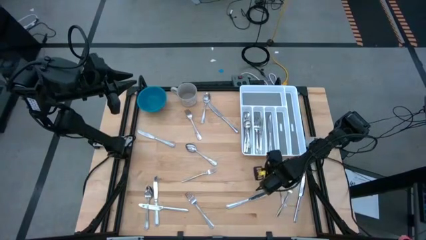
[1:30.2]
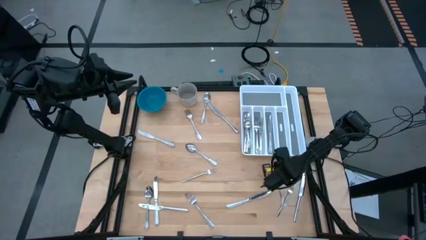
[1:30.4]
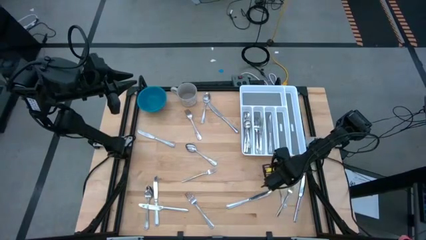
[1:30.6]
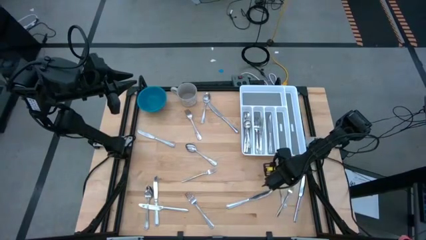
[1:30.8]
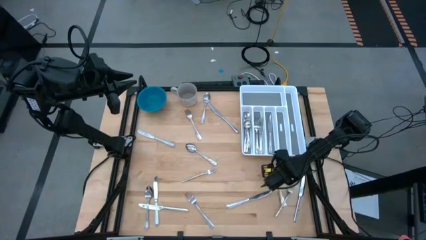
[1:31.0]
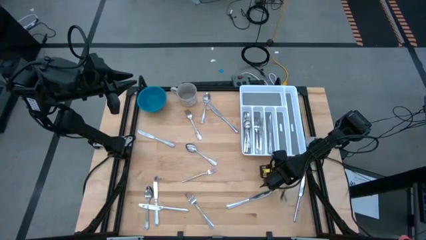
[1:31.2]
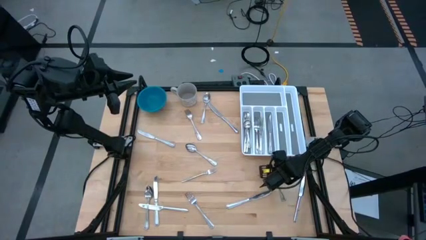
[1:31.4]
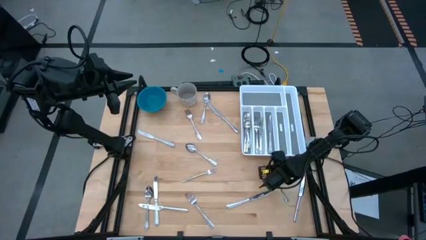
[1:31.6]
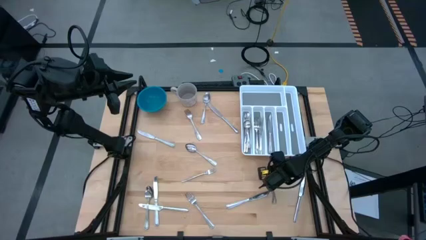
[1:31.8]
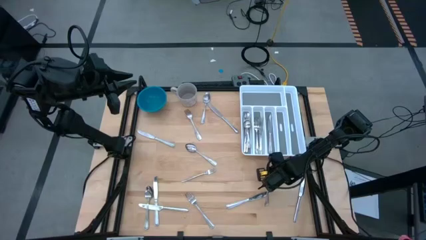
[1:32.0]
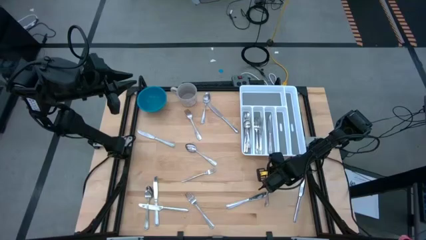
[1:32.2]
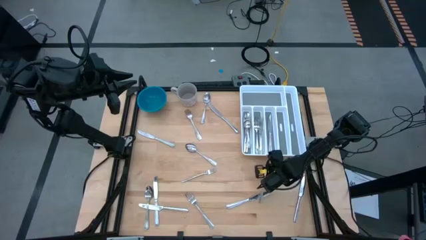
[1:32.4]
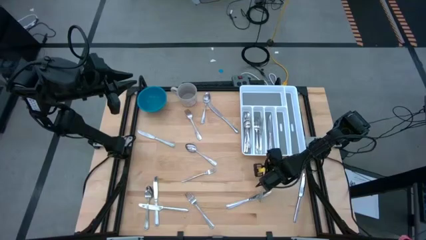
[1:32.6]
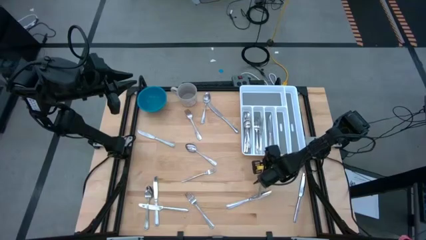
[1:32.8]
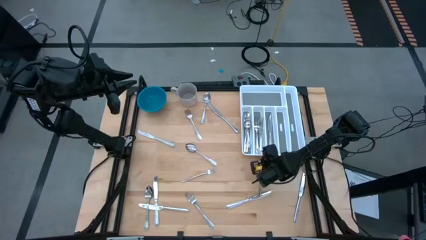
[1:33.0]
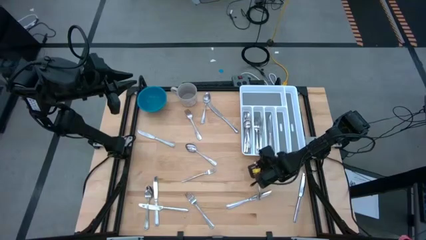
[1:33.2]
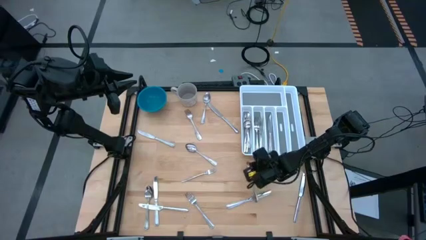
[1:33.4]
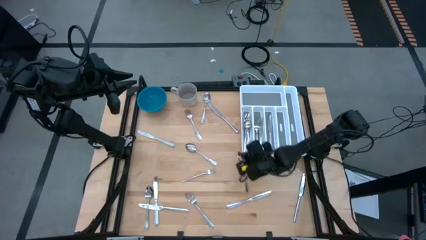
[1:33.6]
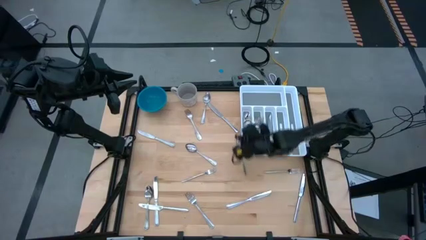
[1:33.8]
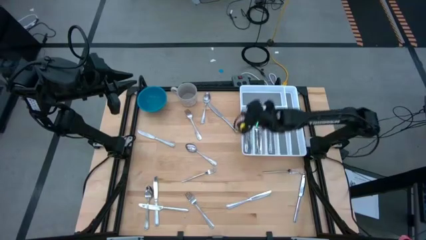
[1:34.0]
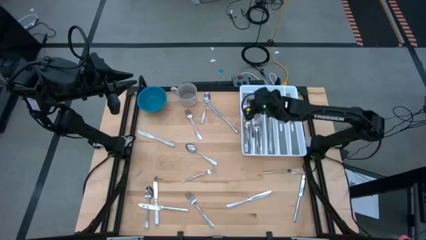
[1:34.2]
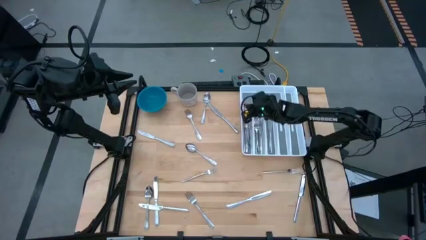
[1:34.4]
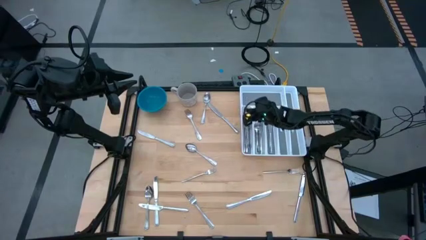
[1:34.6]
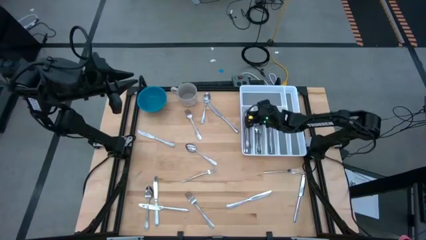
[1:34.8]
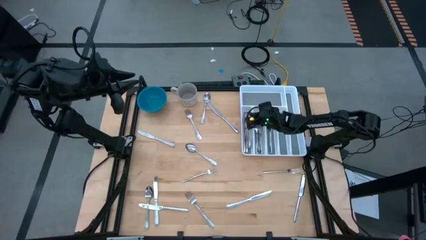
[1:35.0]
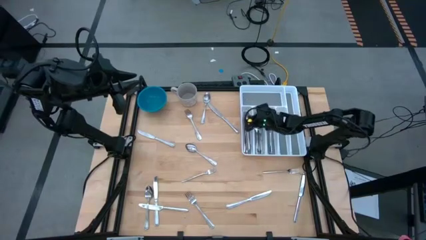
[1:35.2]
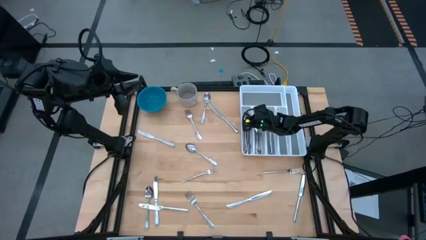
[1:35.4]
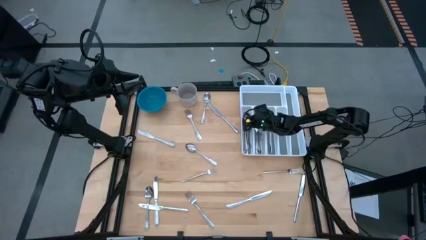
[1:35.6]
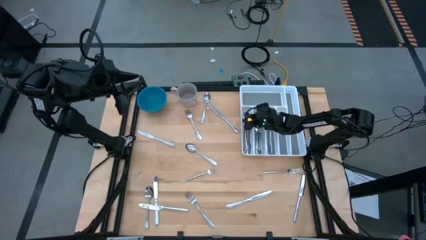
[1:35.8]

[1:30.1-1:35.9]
Task: Sort silverware
Put the spoon in the silverware tray

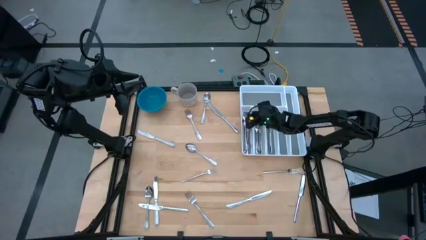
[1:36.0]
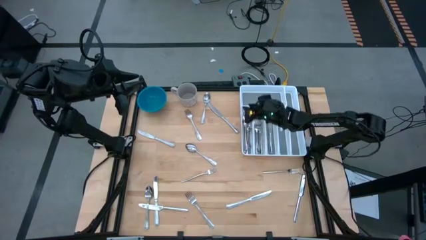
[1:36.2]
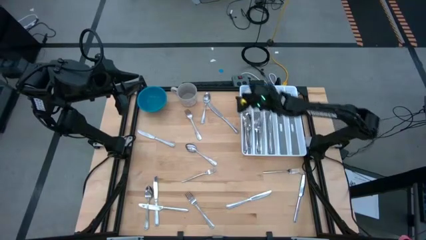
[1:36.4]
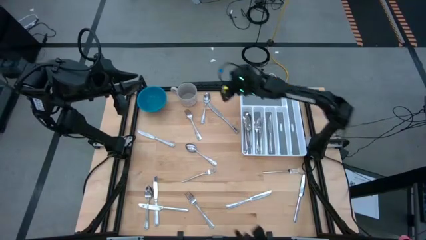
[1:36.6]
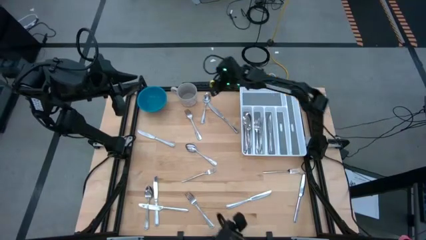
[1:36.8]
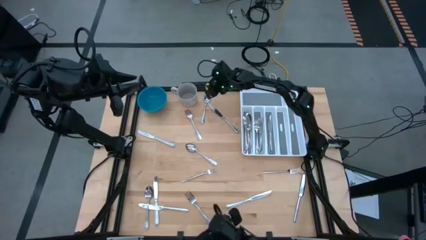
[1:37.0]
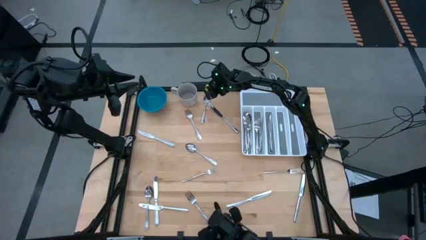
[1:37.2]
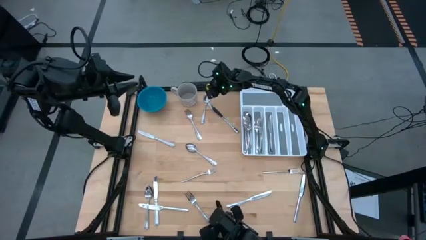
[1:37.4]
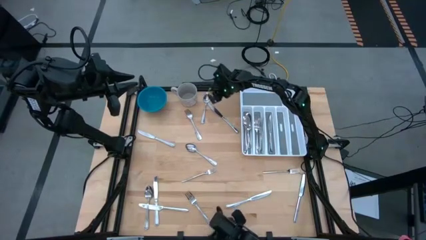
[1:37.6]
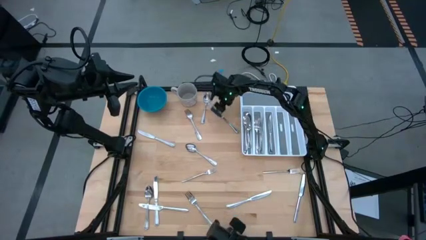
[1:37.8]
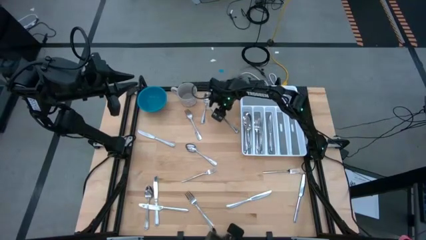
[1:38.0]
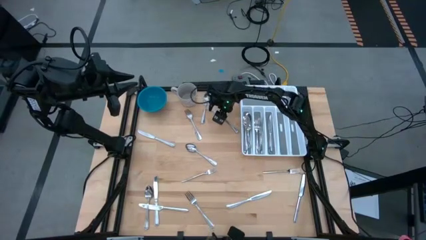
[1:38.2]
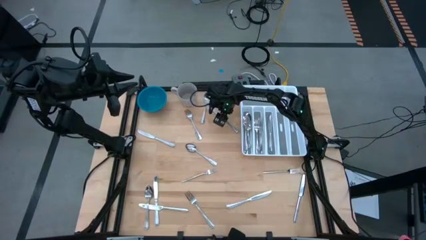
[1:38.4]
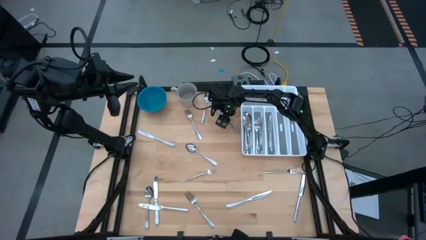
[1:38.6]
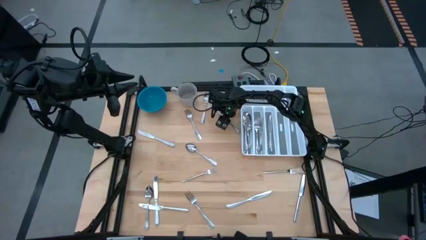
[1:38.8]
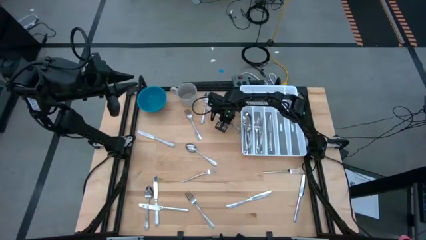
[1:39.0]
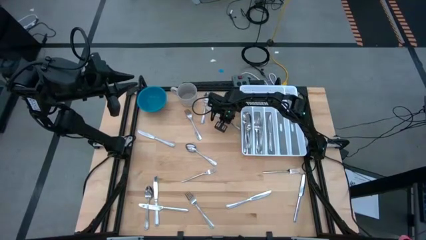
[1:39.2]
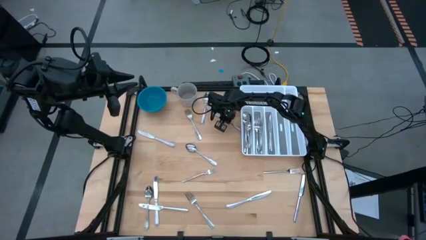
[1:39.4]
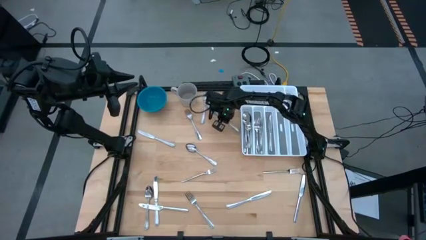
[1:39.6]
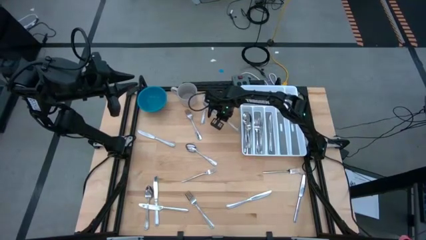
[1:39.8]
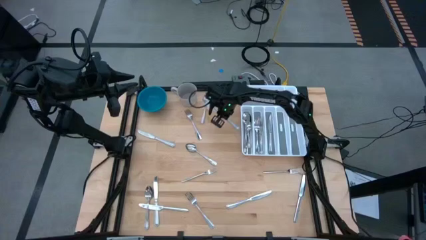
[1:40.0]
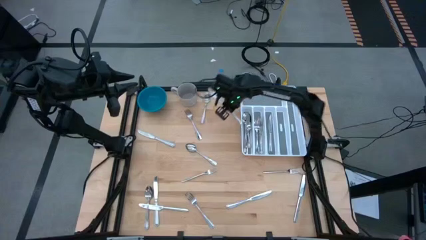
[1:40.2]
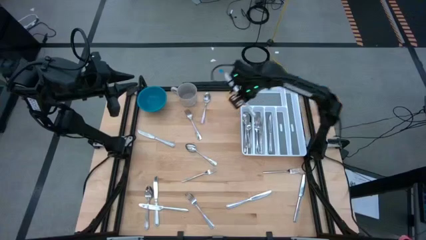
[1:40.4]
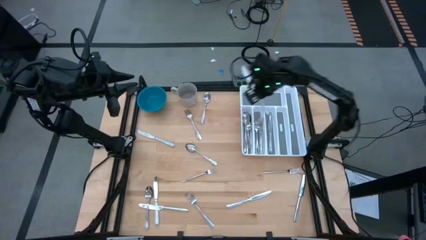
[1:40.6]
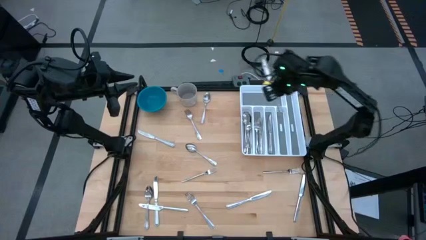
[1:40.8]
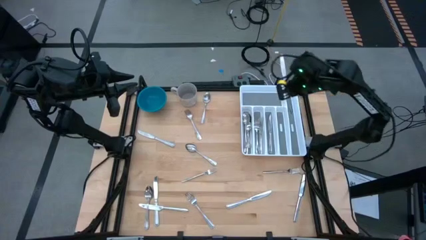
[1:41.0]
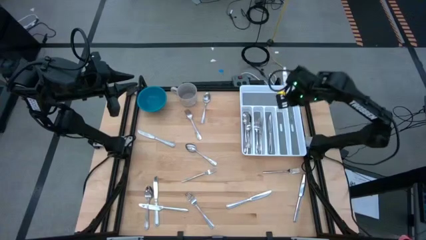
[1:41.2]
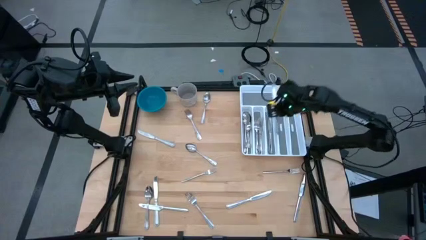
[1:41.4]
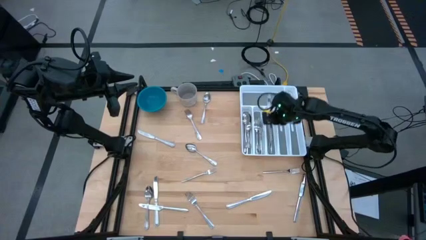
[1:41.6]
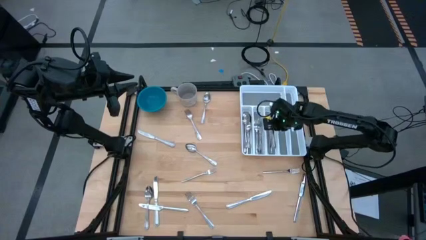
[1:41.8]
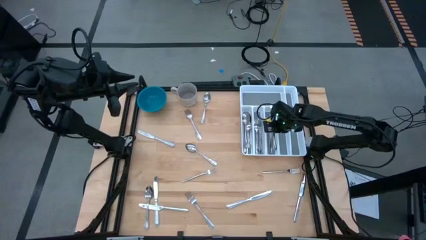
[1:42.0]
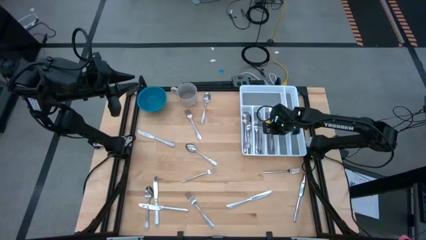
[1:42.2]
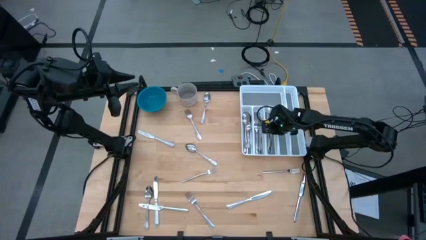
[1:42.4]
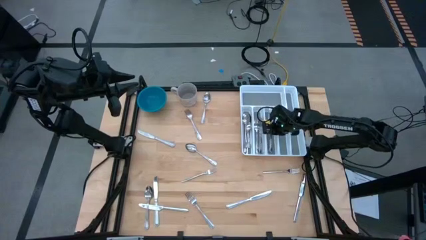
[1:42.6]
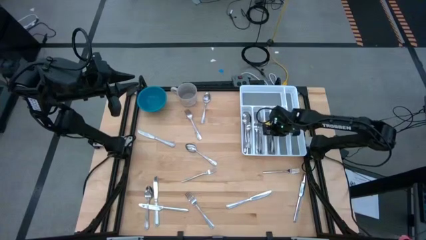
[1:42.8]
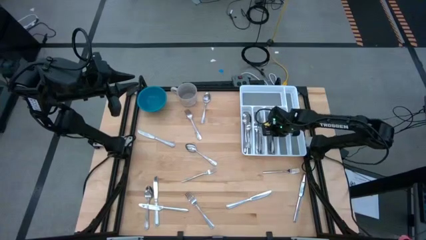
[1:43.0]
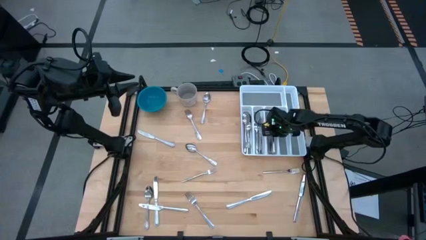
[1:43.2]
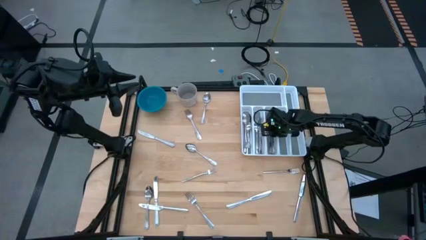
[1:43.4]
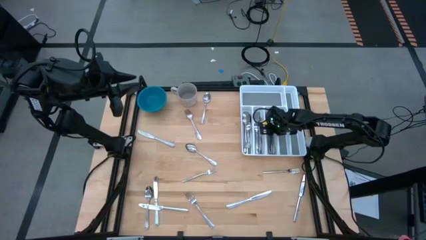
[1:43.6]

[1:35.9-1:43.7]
Put the table knife in the silverware tray

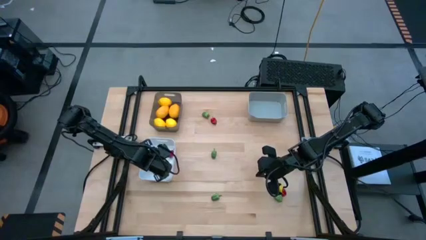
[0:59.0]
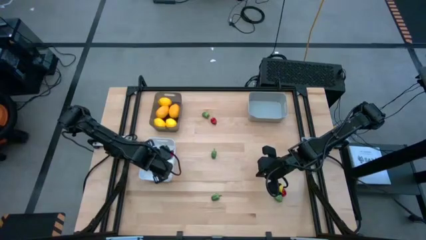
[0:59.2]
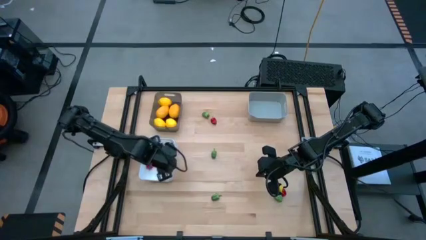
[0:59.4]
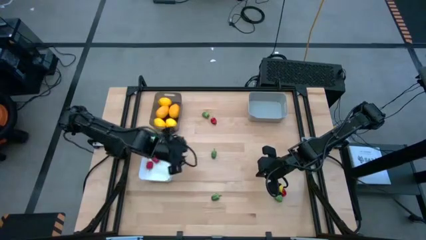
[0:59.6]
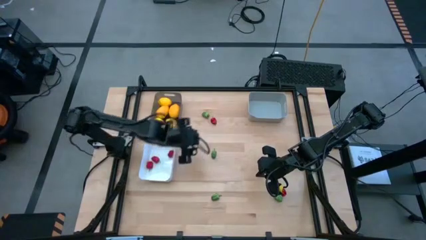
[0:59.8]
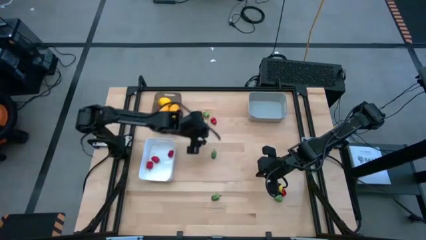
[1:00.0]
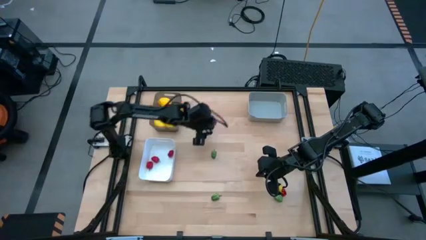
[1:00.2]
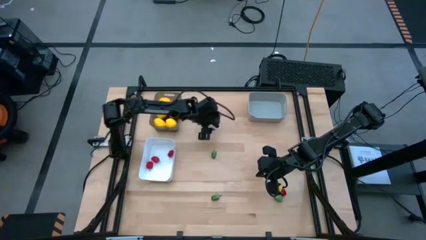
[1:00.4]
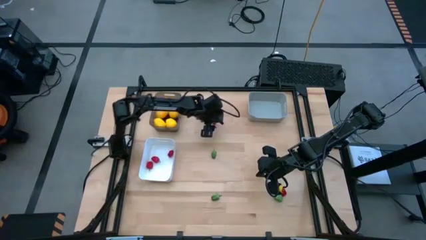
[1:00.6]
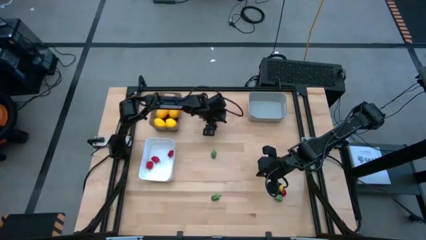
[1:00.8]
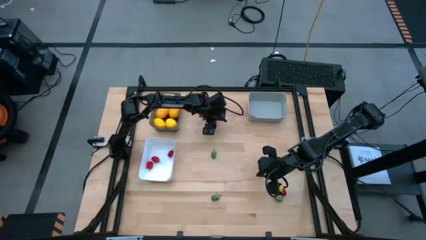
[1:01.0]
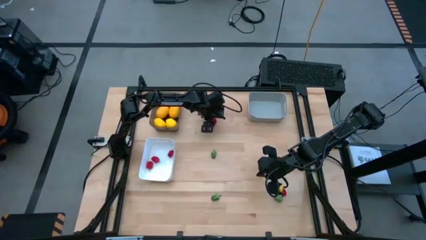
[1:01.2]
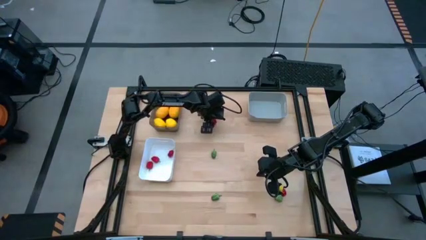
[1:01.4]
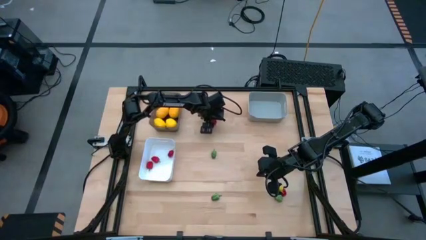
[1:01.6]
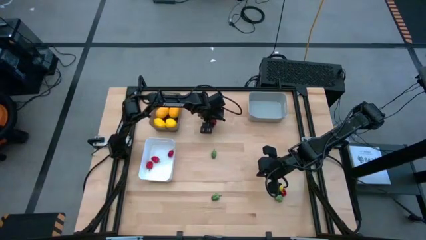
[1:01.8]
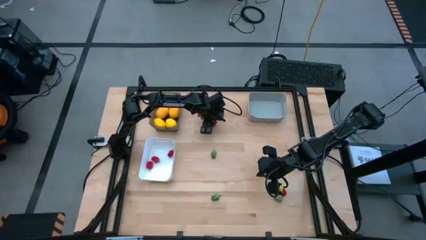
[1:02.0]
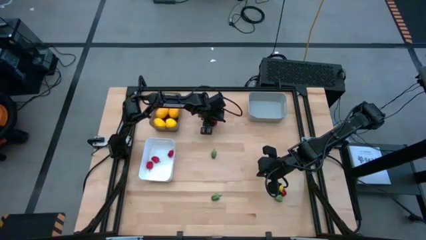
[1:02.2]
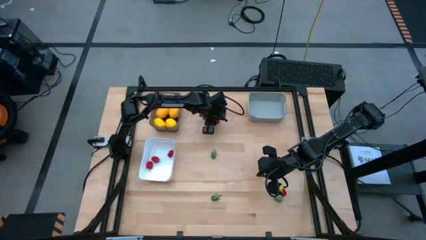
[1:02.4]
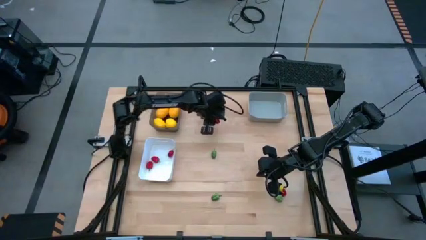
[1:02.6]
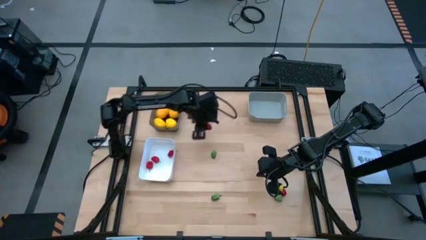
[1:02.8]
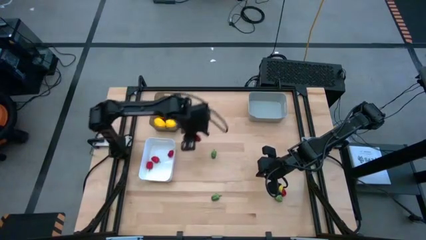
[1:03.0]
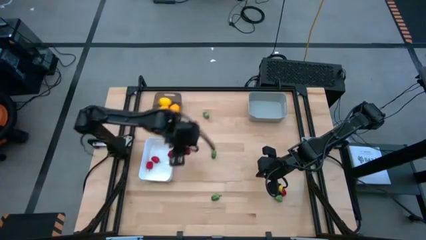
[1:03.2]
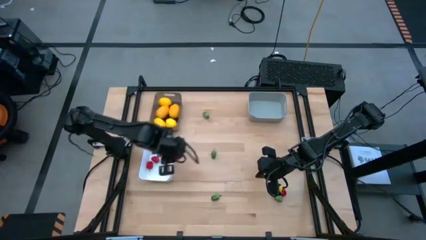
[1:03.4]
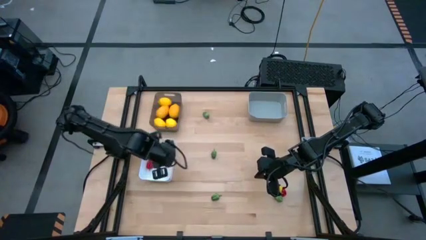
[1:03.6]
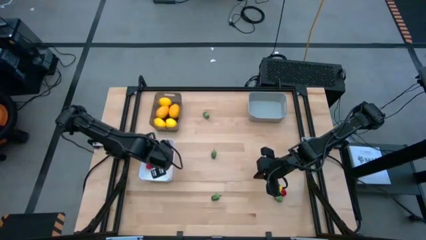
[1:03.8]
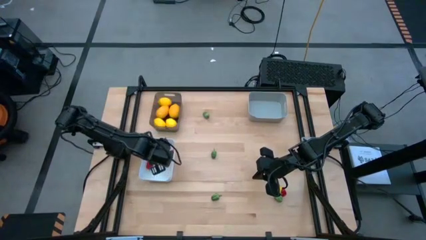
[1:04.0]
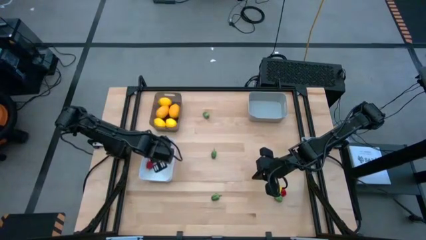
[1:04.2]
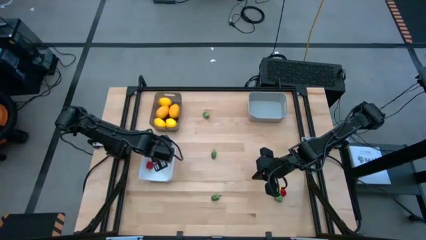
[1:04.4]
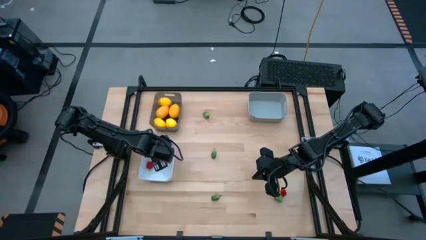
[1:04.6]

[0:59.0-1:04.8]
Task: Sort produce into baskets
Put the top red chili pepper into the white bin
